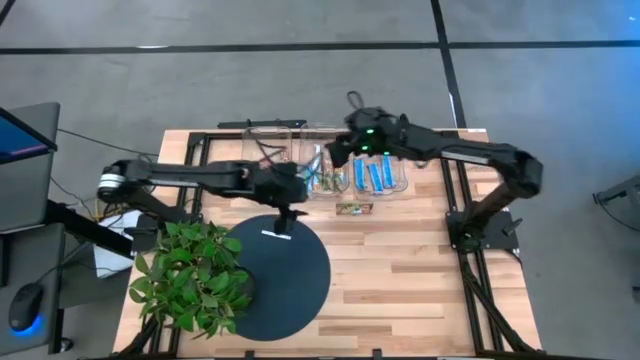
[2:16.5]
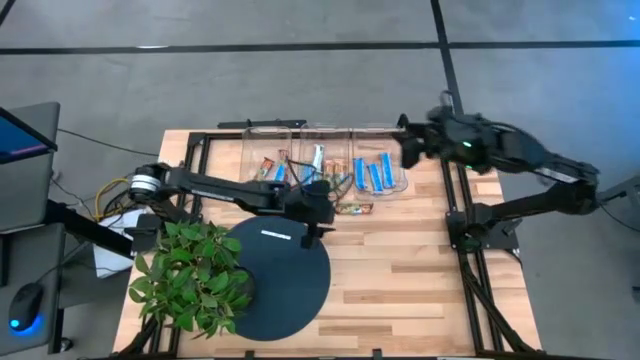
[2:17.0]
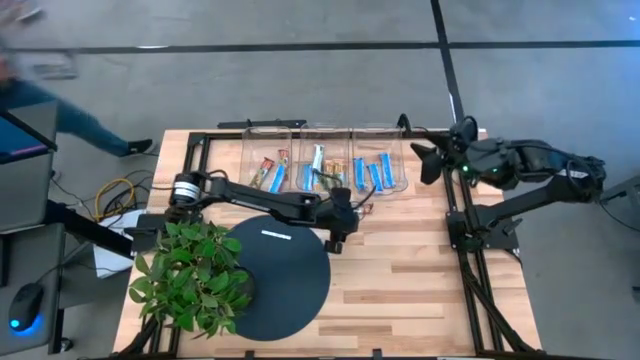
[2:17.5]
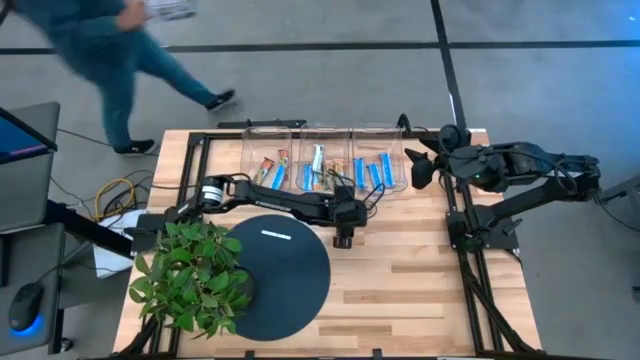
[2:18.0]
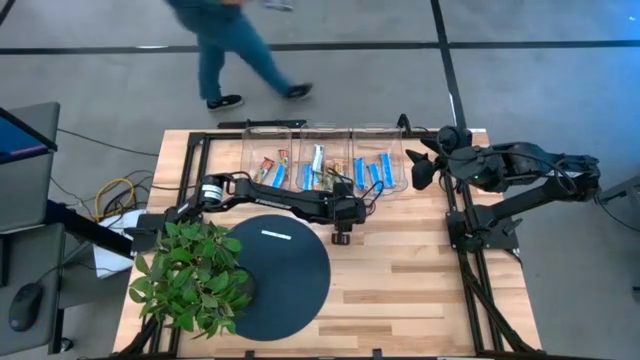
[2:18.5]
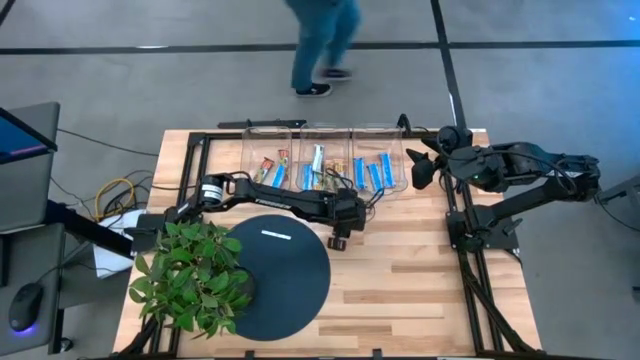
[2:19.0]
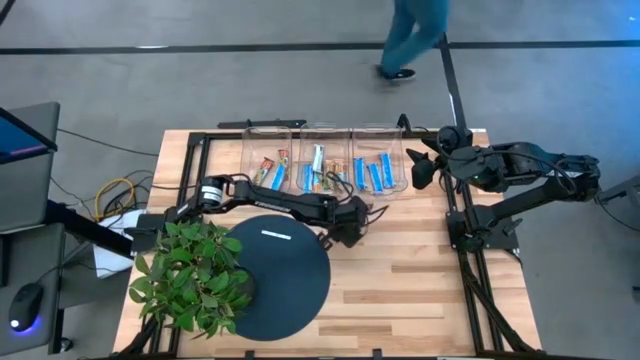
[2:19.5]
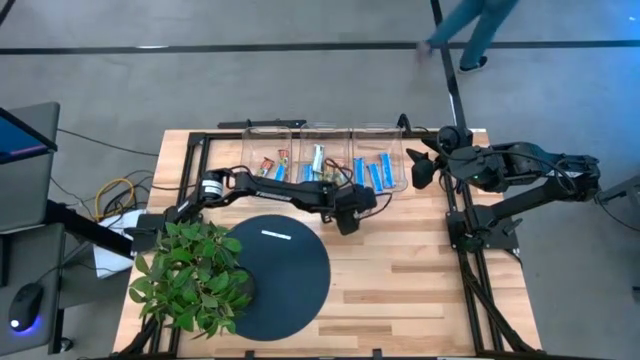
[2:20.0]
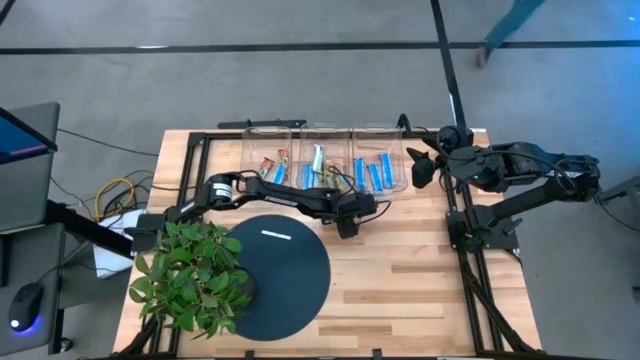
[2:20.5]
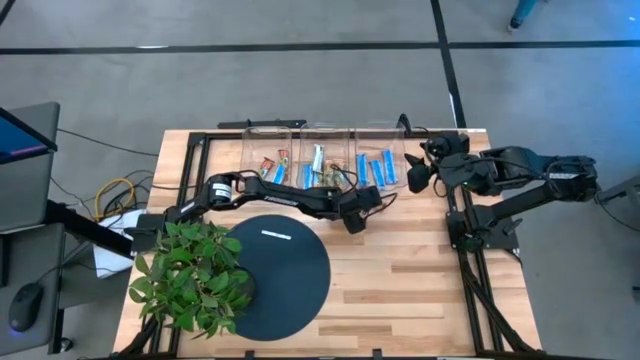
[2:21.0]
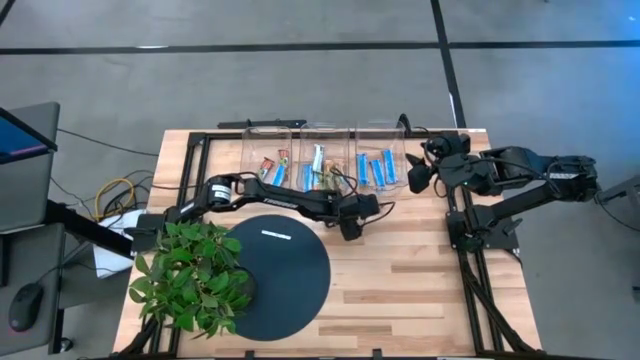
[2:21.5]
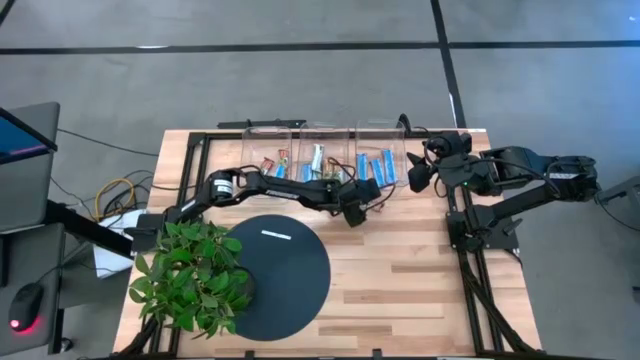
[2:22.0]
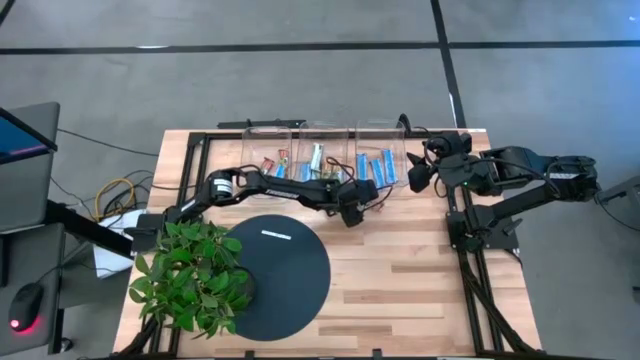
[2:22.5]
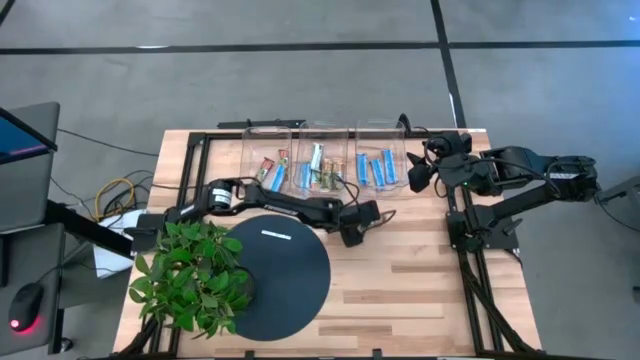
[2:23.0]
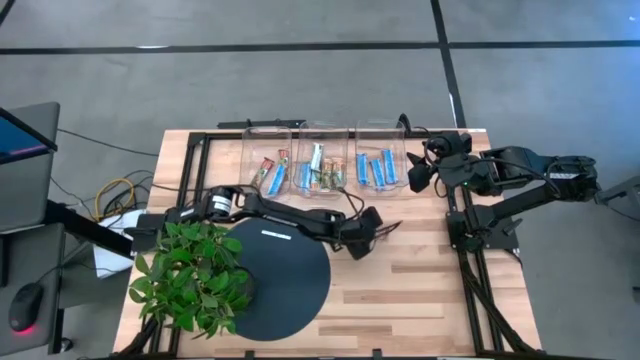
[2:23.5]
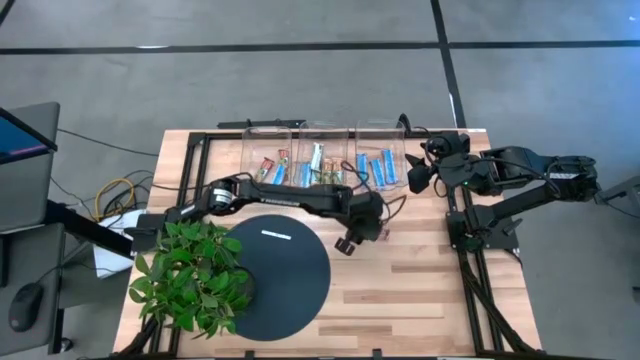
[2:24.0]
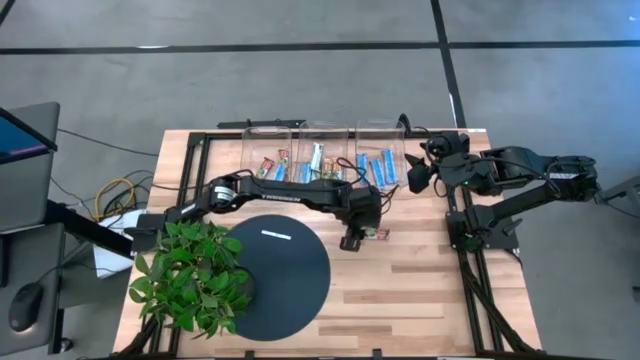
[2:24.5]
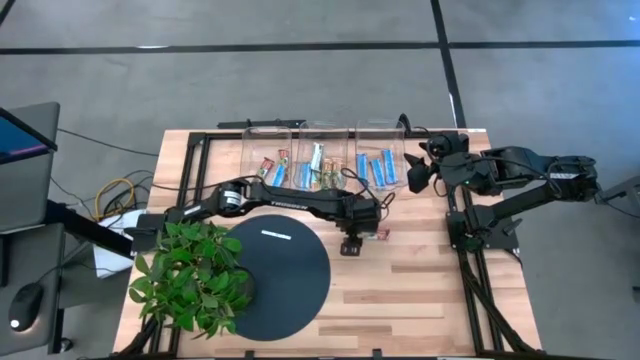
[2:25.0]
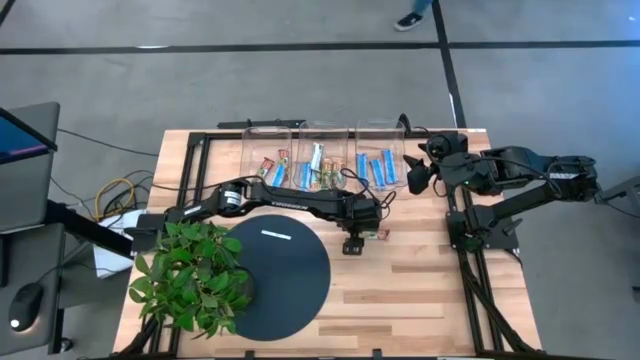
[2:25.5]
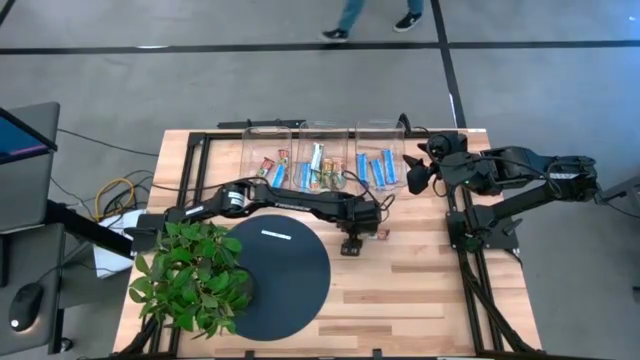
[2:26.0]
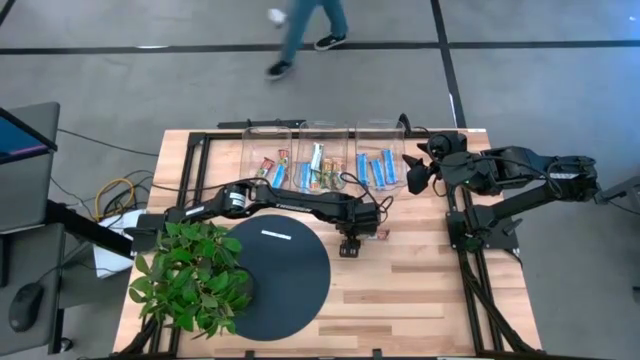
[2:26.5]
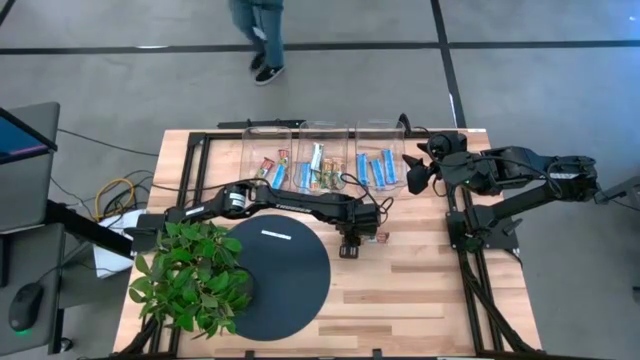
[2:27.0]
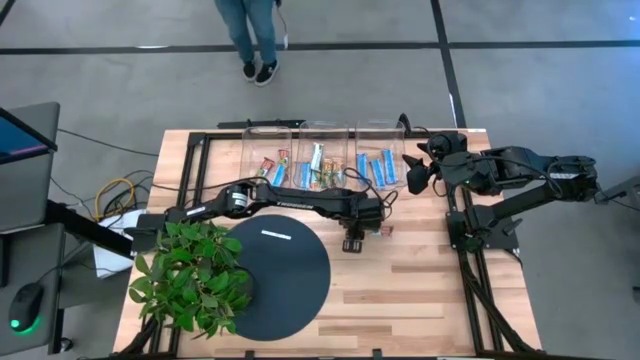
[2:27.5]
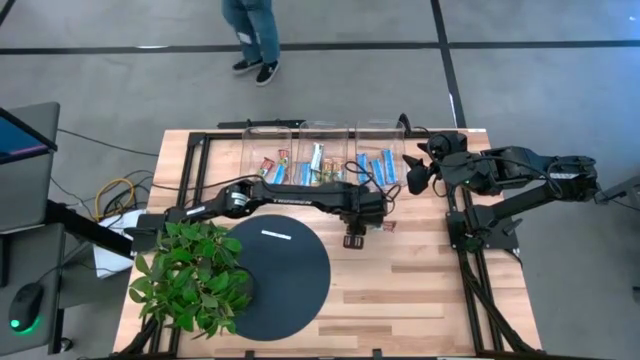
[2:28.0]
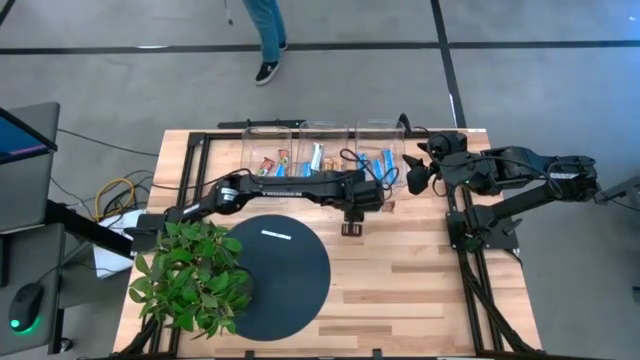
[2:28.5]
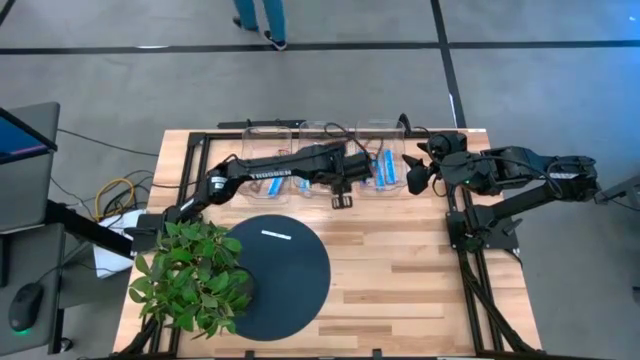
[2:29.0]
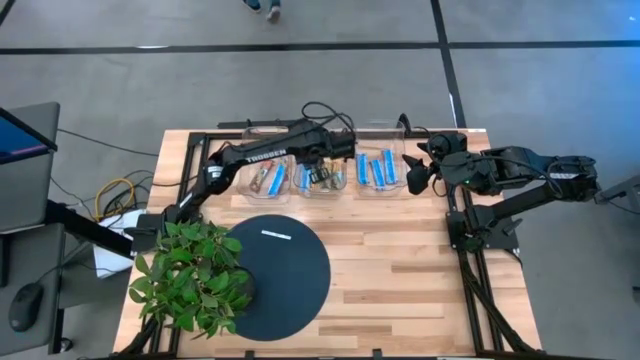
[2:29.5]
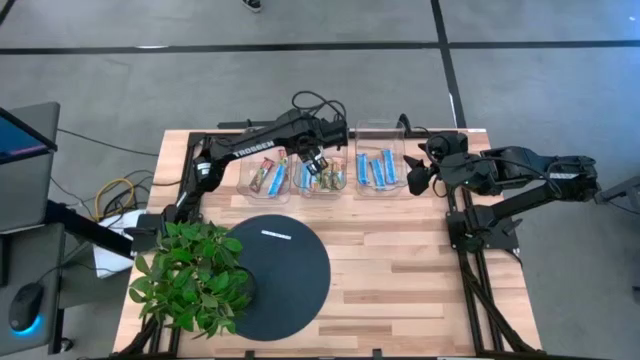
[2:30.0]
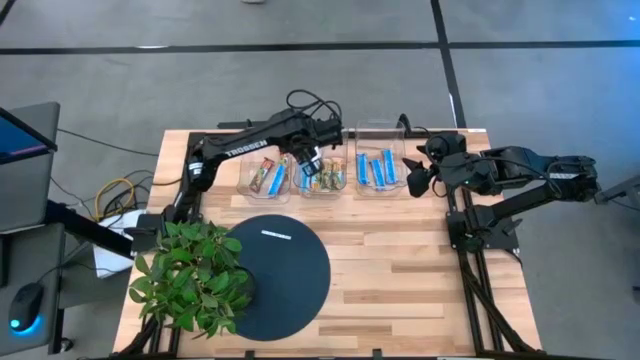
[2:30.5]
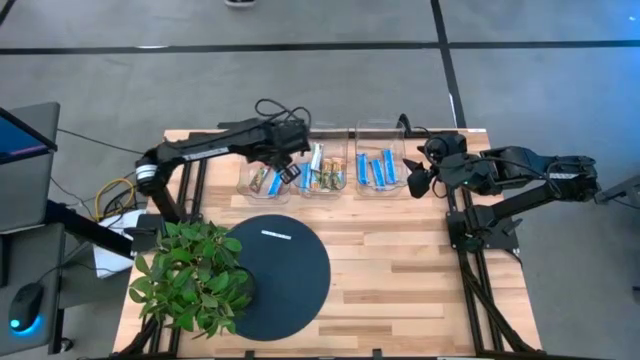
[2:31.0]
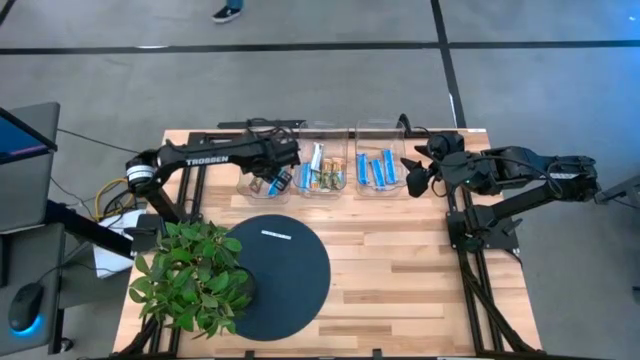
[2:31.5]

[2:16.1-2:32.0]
Task: Pick and place Granola Bars by type
Put the red granola bar into the left transparent bin

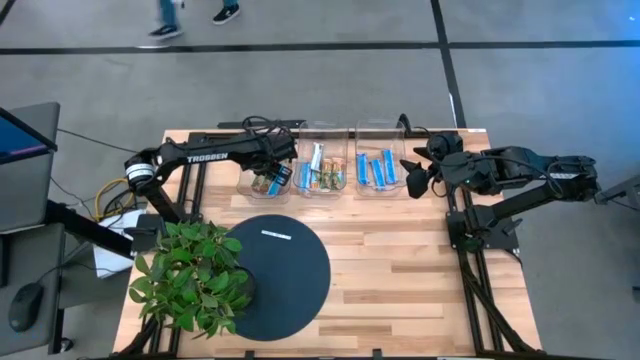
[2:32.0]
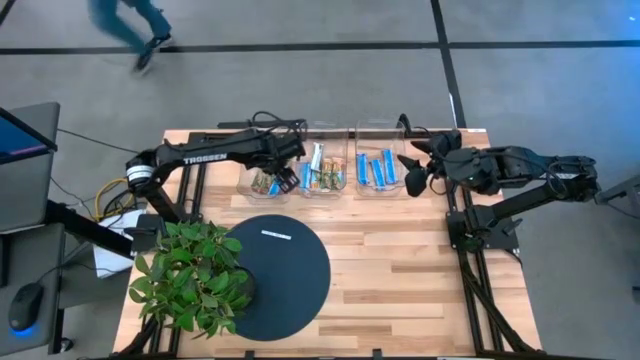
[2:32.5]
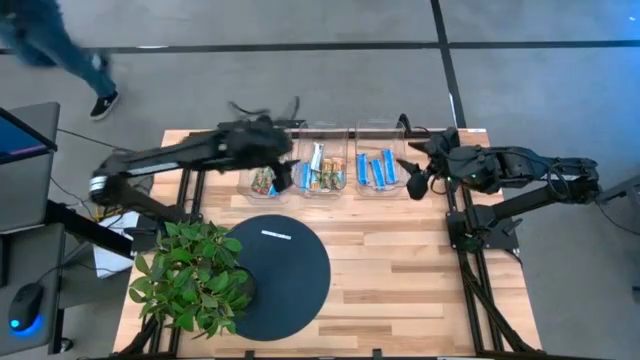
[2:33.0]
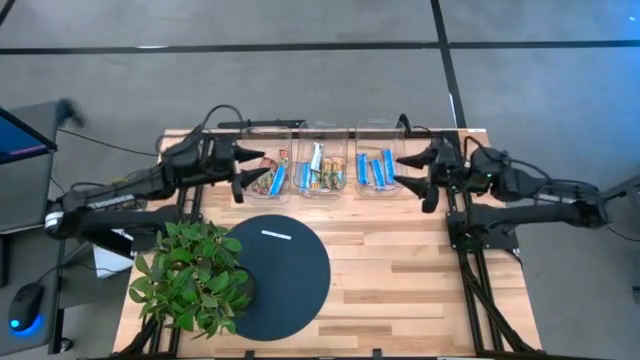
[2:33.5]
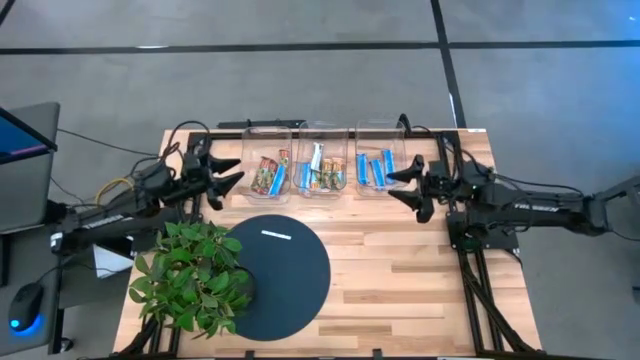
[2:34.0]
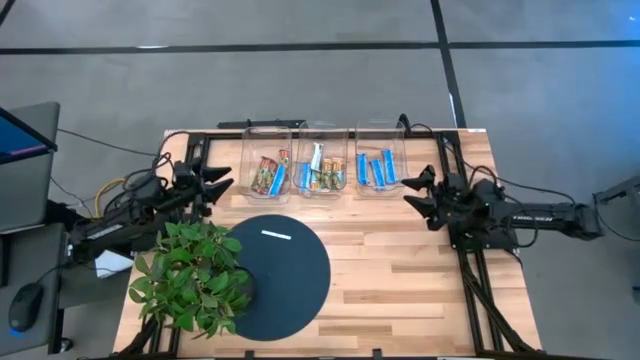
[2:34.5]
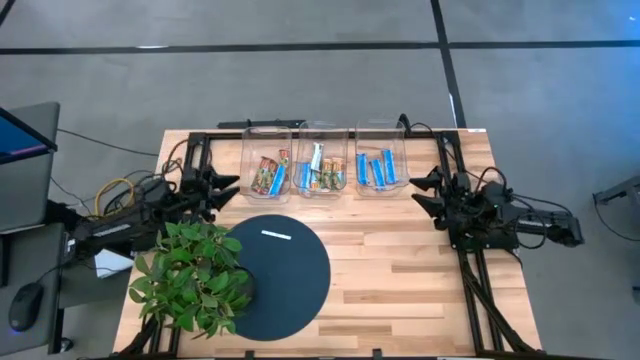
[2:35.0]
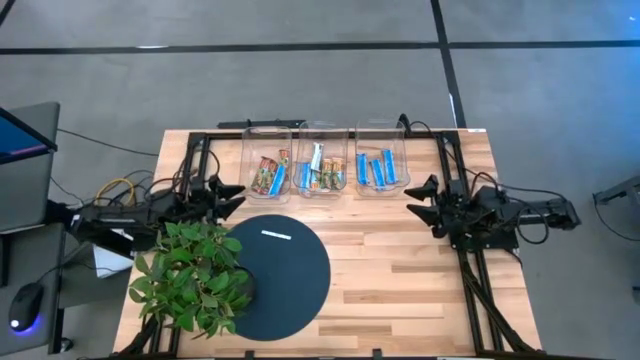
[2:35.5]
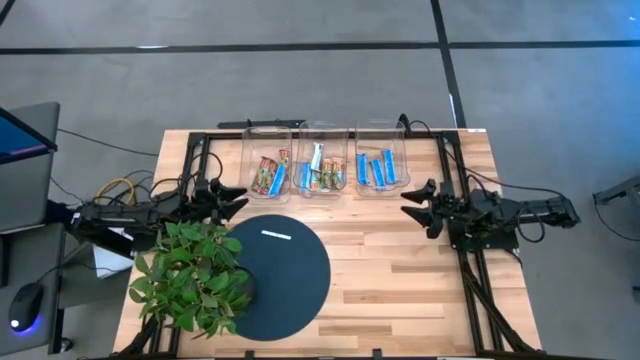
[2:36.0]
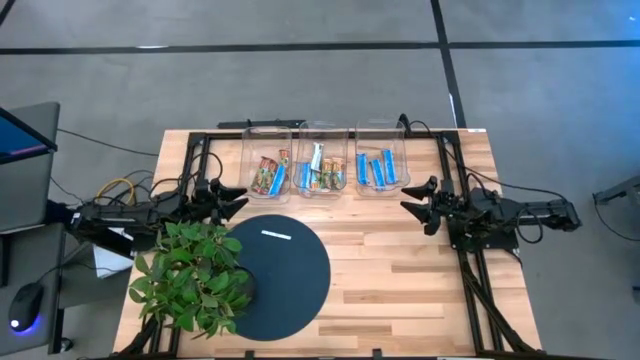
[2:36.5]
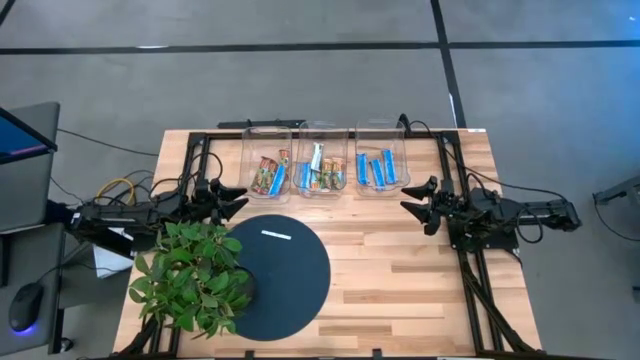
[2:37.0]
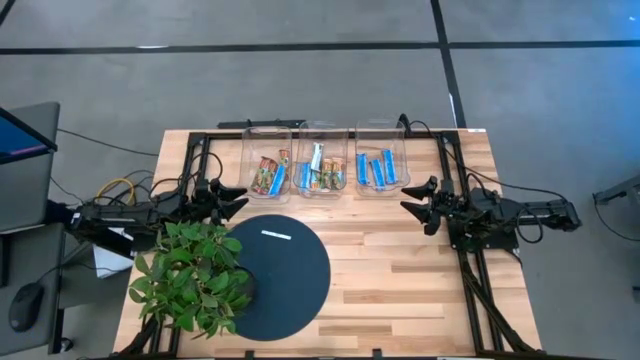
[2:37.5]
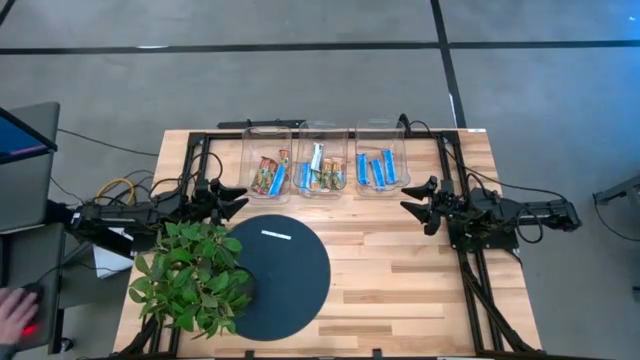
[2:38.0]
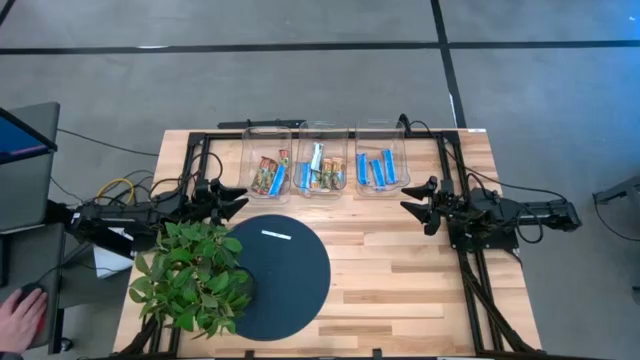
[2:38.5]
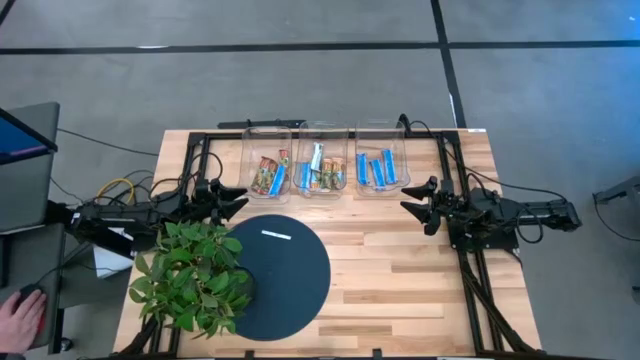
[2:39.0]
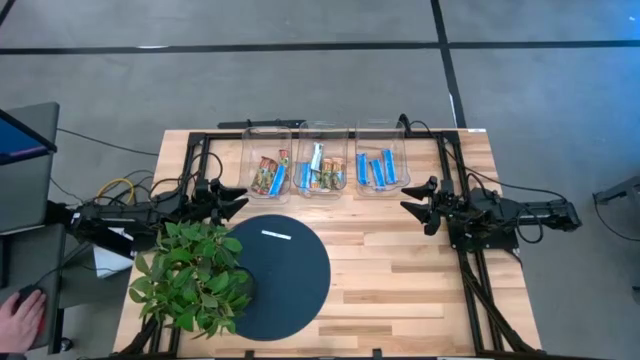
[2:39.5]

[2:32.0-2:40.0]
Return to Home Position
